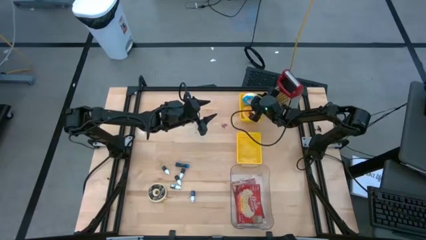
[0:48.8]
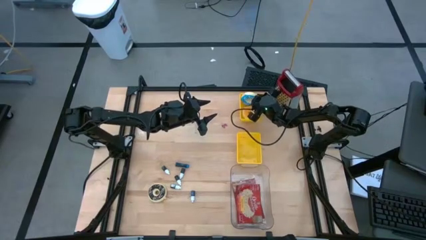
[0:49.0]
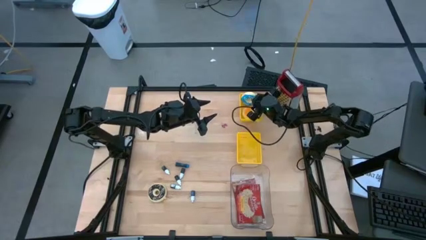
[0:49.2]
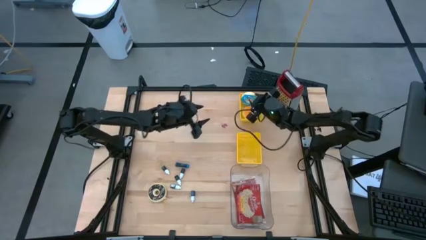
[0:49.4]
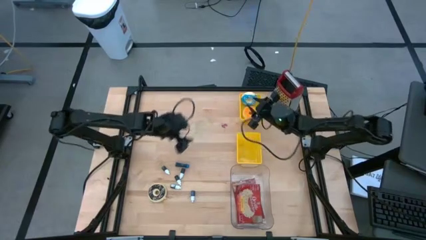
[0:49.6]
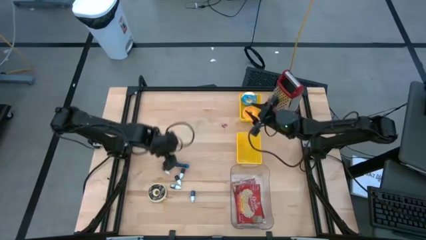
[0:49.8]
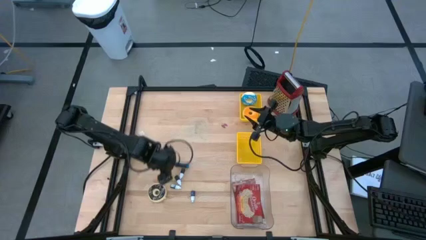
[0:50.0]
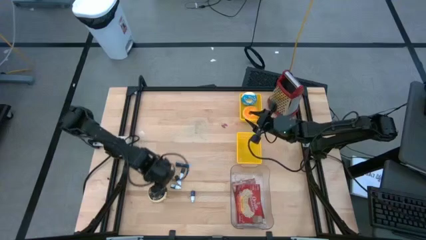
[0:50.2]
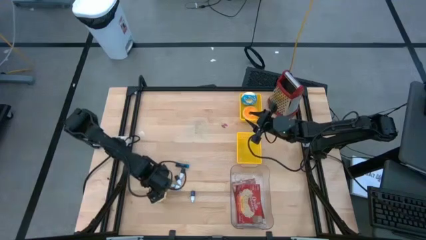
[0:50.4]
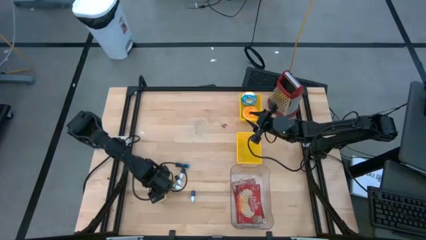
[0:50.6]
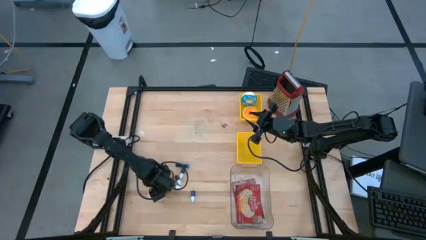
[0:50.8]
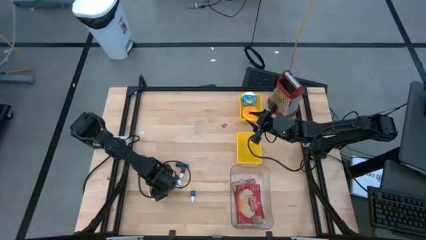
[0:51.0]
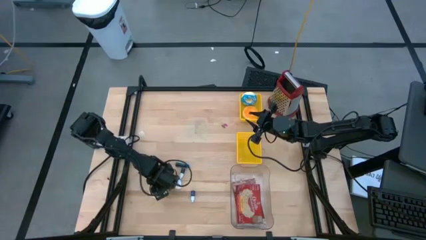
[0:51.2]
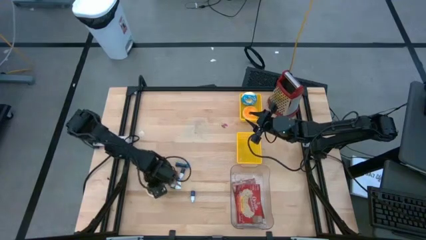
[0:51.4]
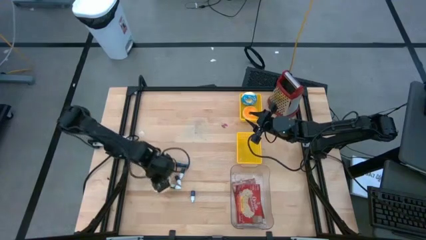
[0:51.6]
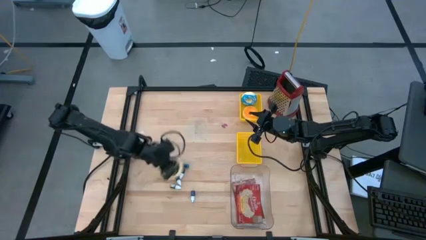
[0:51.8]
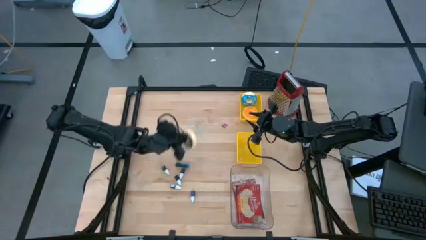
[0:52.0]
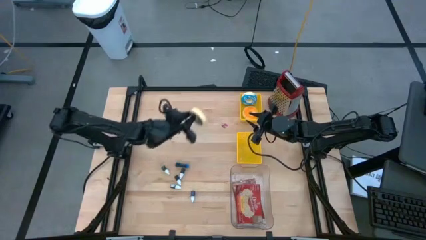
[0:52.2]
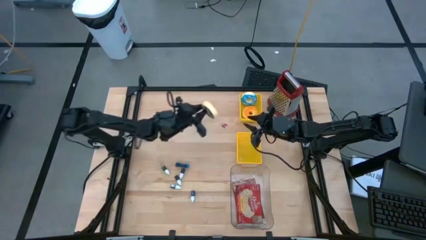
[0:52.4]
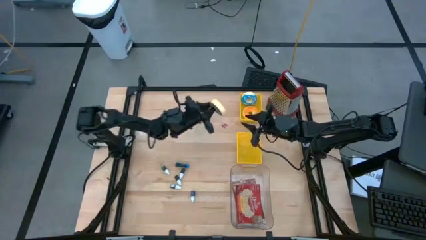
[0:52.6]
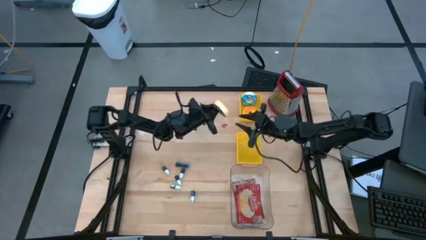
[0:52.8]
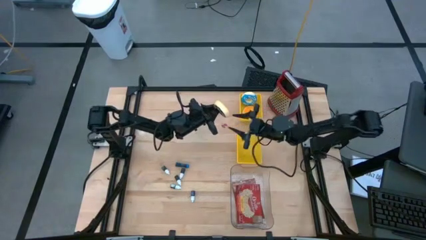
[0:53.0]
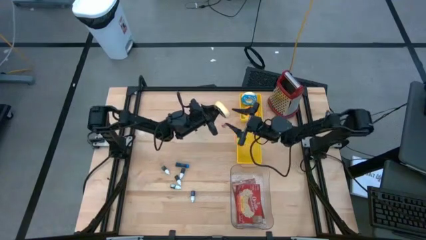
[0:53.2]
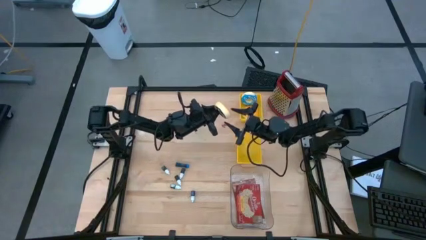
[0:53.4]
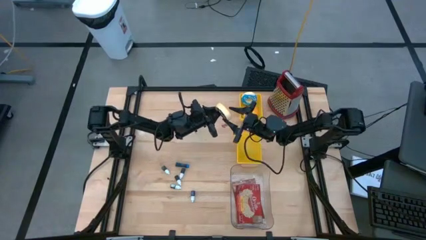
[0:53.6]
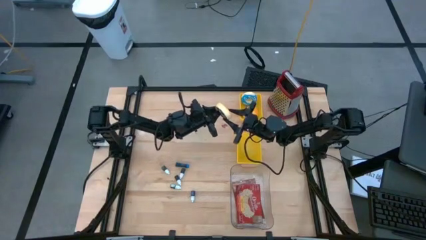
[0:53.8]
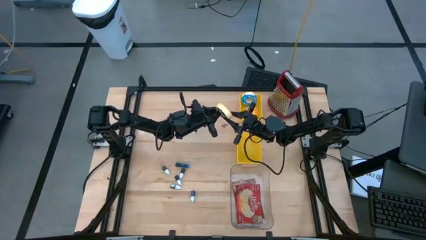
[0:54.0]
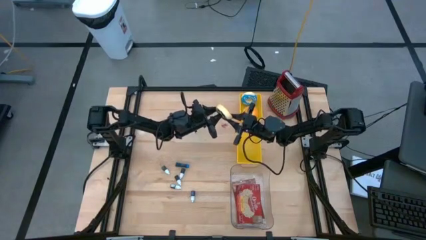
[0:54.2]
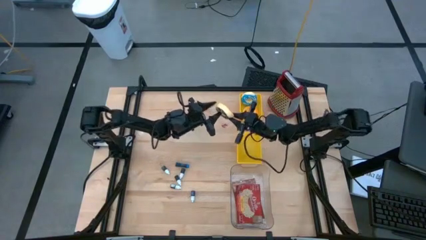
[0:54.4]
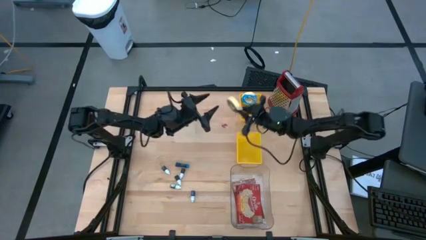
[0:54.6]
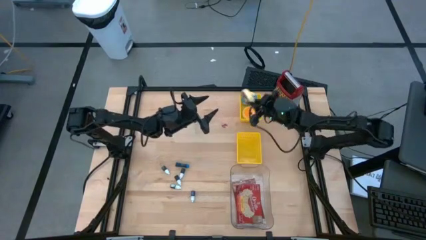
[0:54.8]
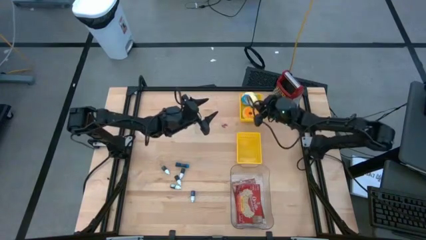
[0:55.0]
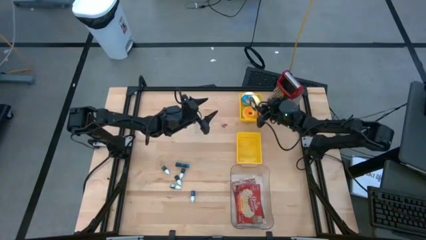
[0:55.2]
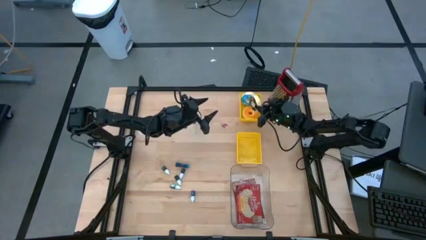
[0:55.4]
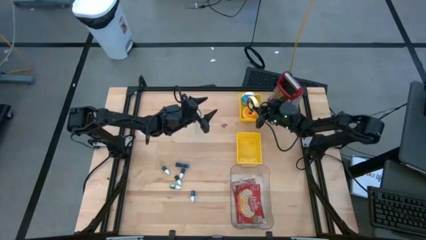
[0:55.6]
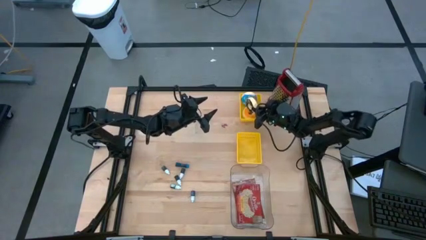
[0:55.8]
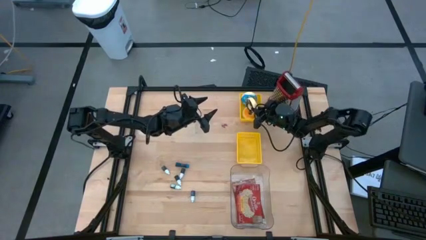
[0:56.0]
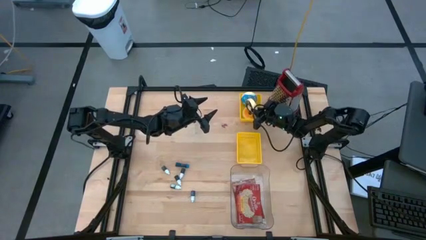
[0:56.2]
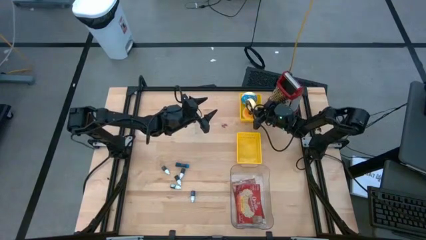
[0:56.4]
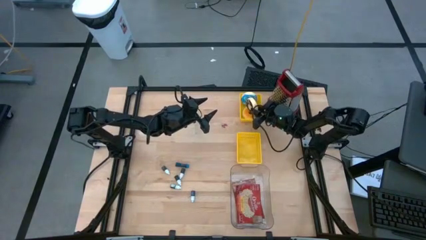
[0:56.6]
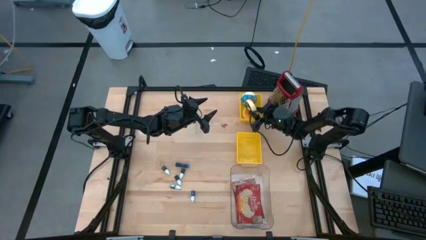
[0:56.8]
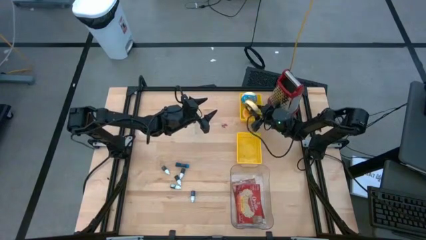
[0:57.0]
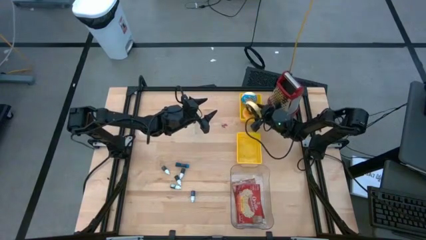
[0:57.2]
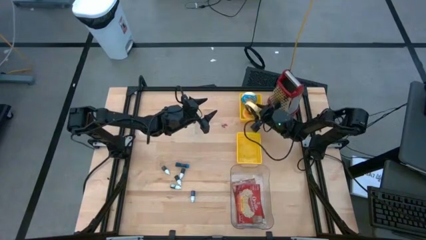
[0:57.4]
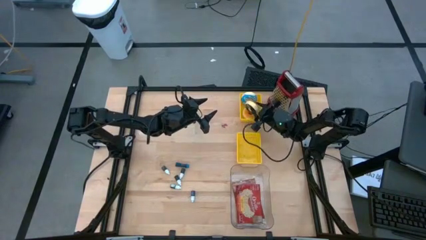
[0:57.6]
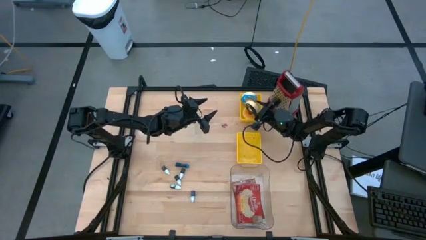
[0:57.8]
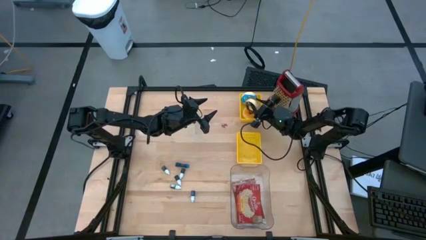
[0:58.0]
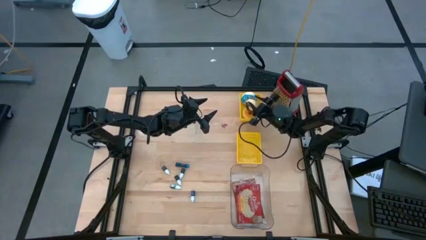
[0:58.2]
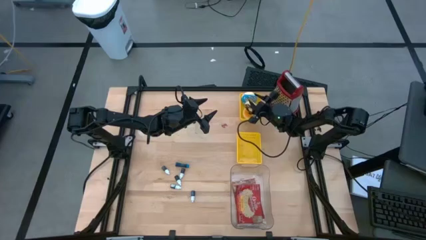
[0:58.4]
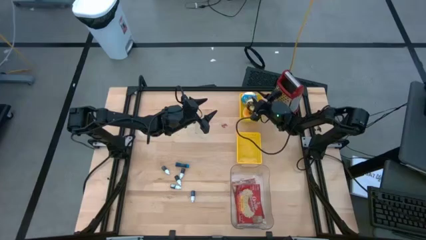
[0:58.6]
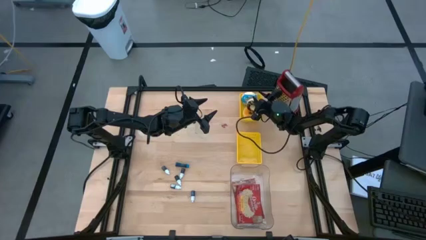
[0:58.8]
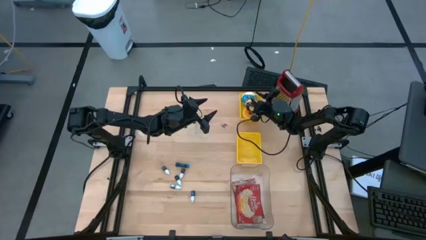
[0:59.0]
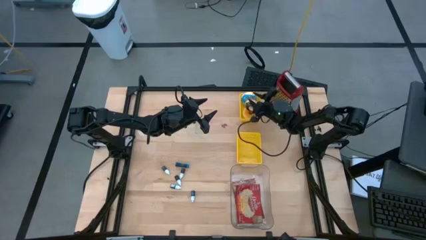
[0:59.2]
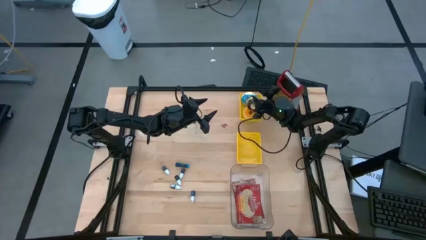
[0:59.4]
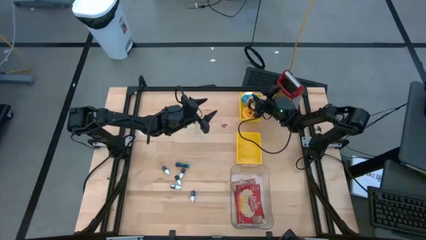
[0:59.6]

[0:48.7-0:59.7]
Put the black donut into the top yellow bin

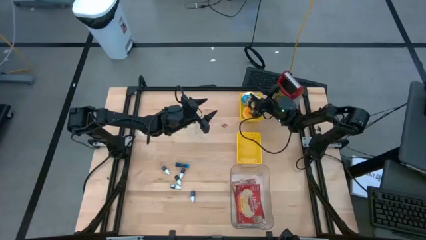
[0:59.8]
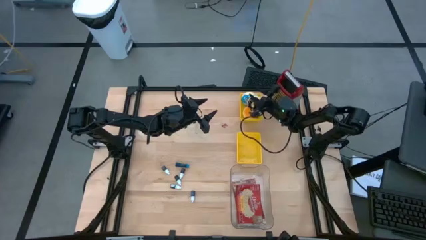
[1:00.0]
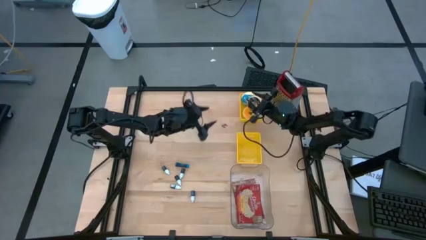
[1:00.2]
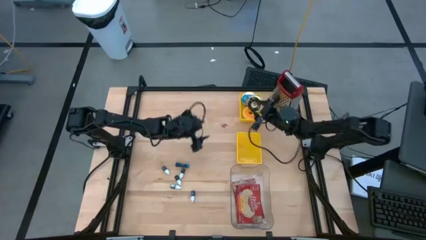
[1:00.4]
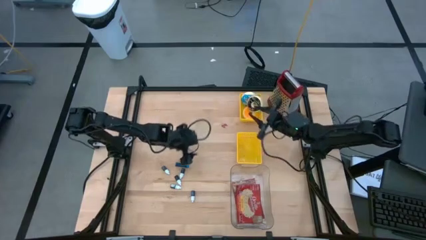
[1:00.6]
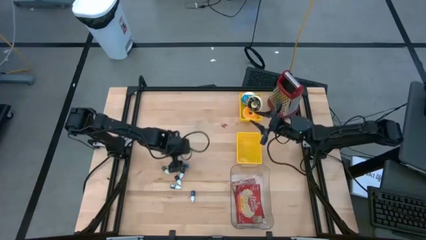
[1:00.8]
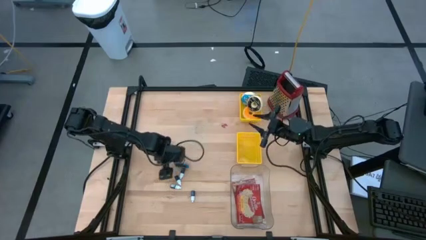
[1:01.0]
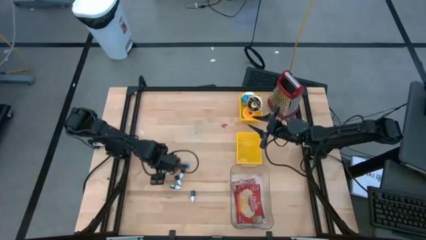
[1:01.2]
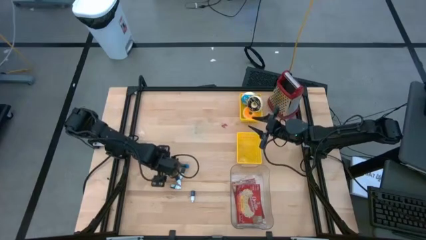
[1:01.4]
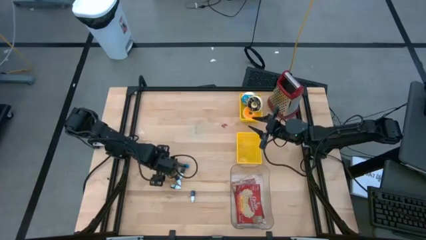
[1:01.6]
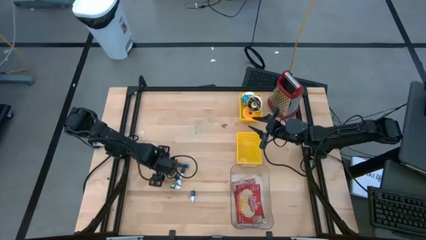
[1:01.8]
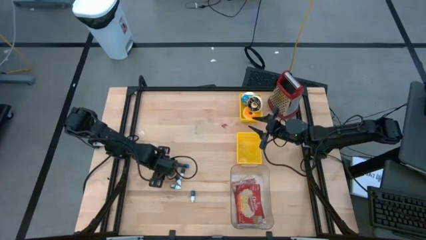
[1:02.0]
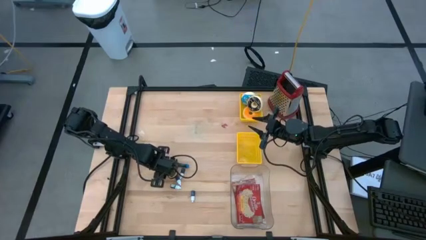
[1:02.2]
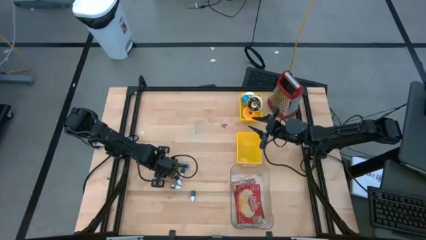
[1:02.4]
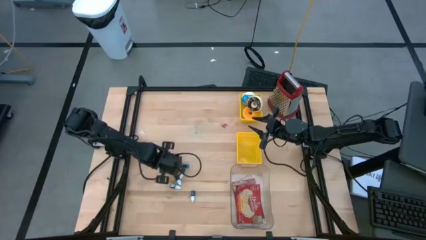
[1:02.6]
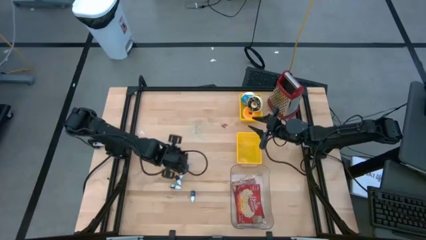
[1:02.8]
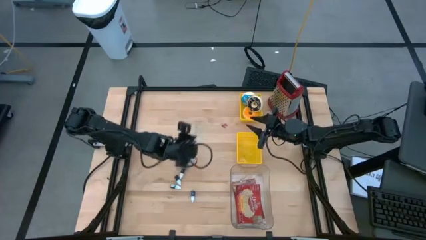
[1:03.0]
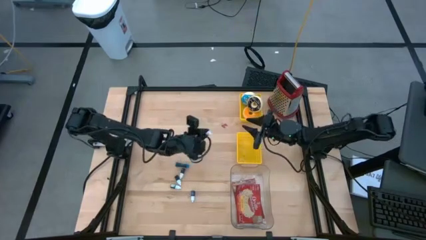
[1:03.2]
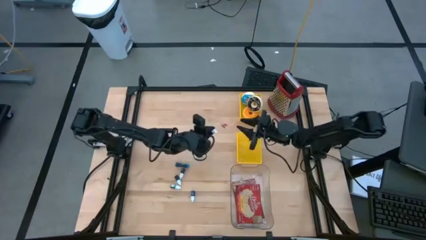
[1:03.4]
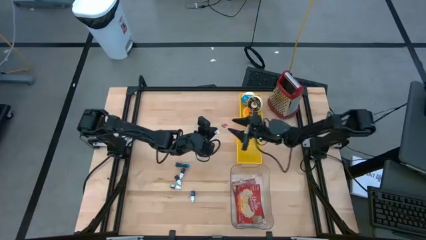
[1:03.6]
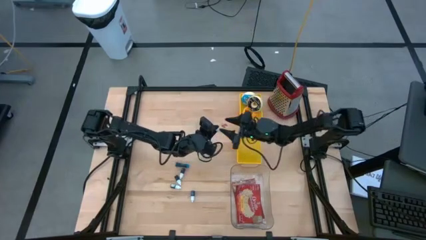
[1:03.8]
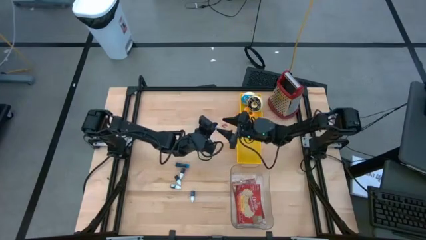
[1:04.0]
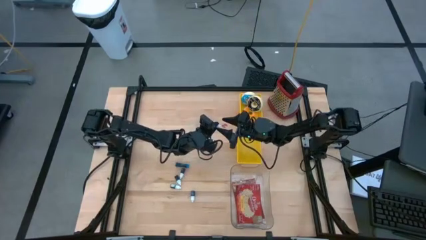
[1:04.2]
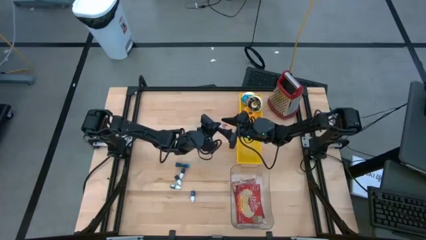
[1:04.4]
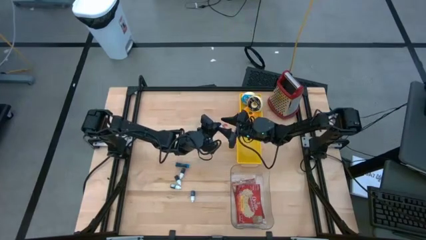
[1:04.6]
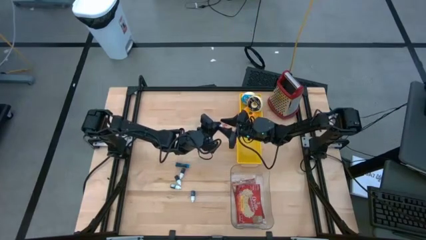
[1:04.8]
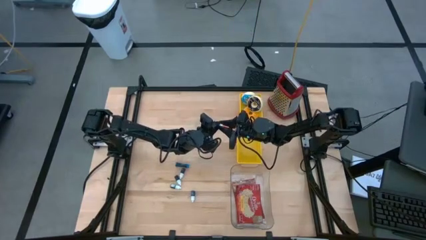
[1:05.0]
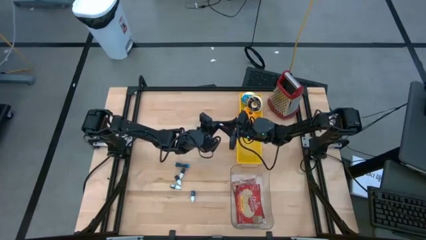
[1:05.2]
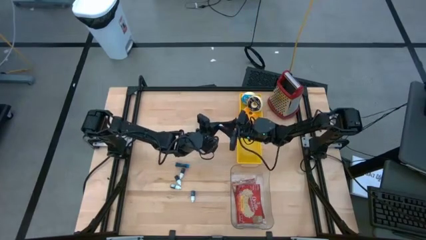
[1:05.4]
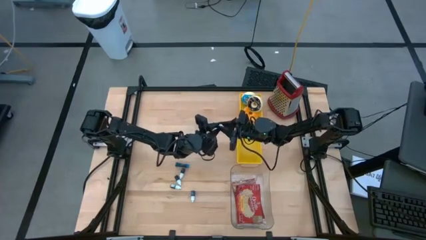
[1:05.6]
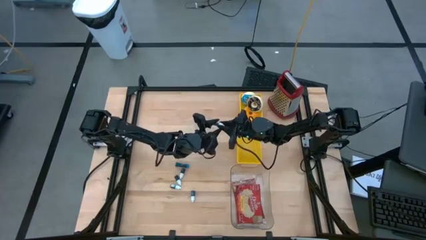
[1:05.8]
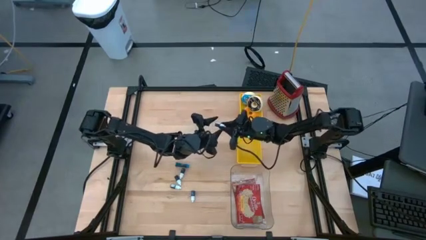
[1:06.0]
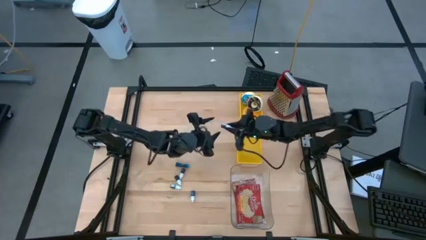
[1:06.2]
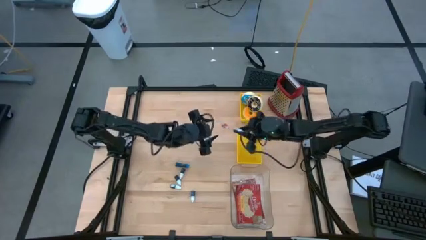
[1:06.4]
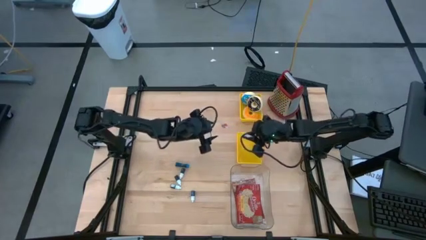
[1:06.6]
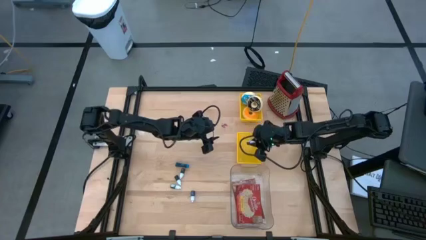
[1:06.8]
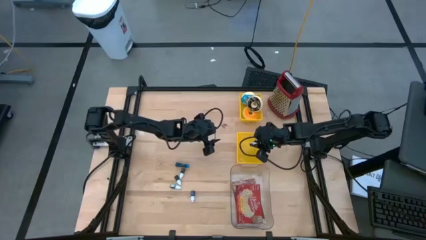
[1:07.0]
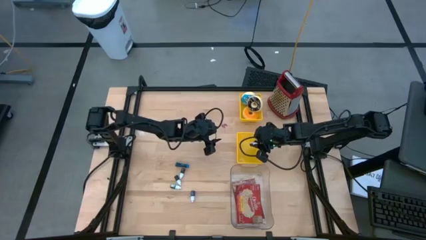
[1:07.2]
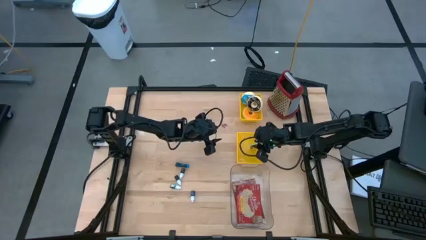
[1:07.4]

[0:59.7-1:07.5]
Put the black food coloring bottle into the bottom yellow bin
